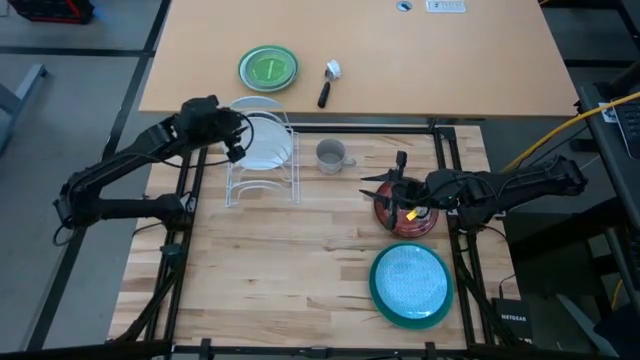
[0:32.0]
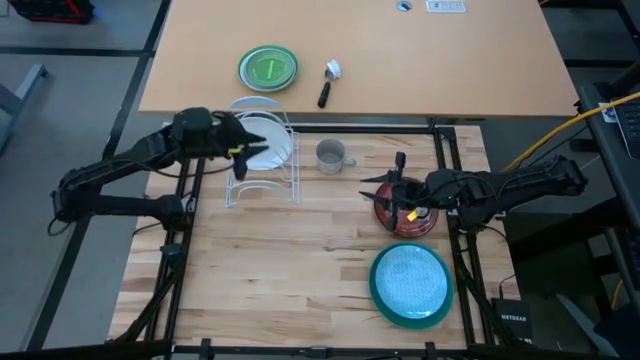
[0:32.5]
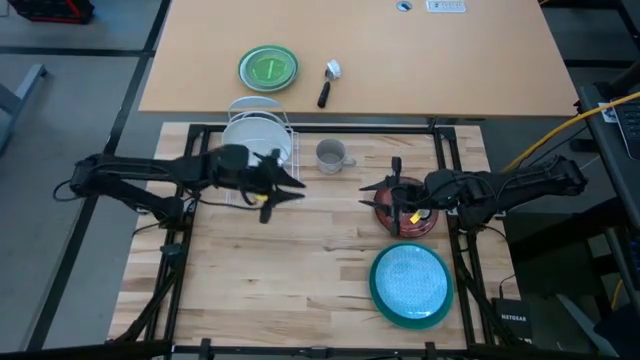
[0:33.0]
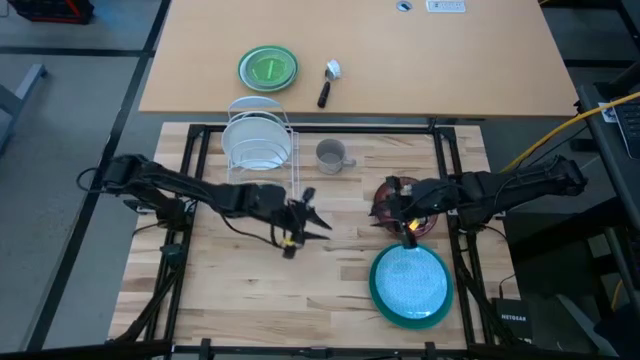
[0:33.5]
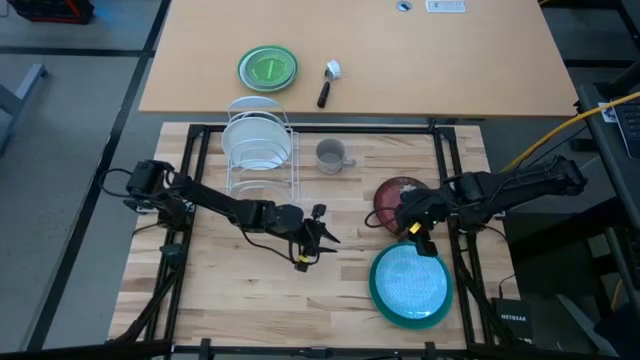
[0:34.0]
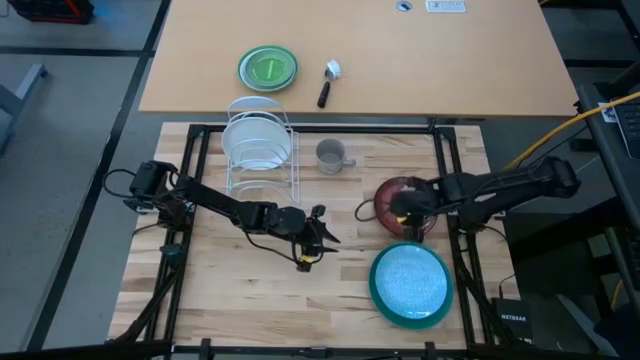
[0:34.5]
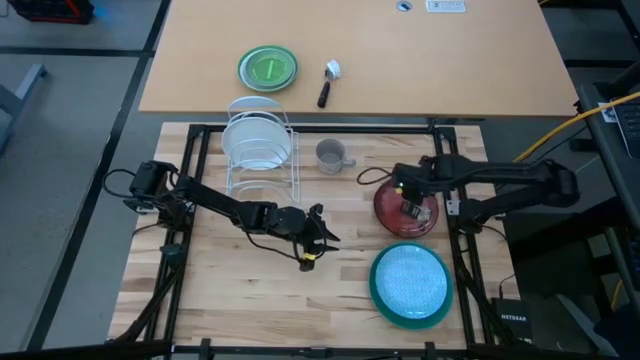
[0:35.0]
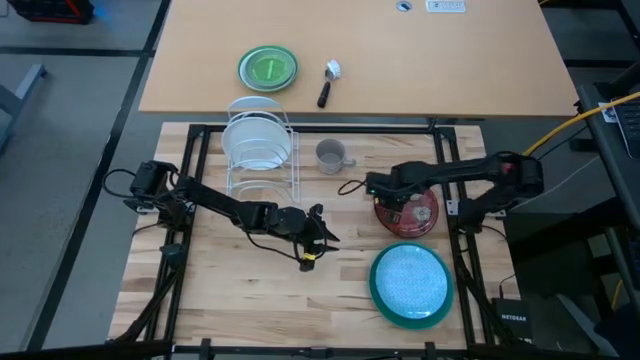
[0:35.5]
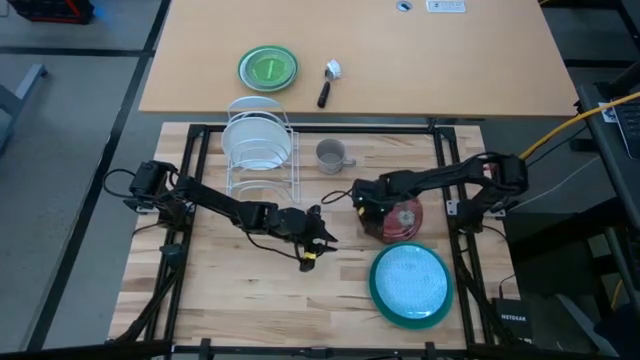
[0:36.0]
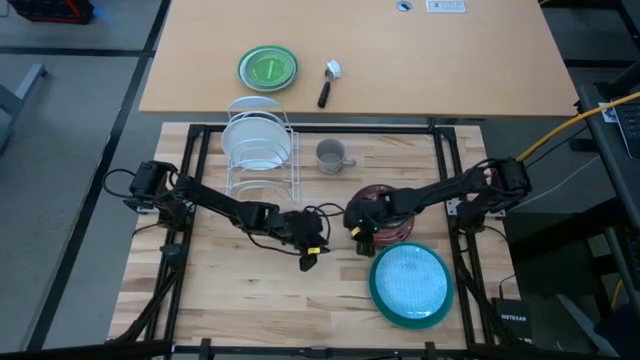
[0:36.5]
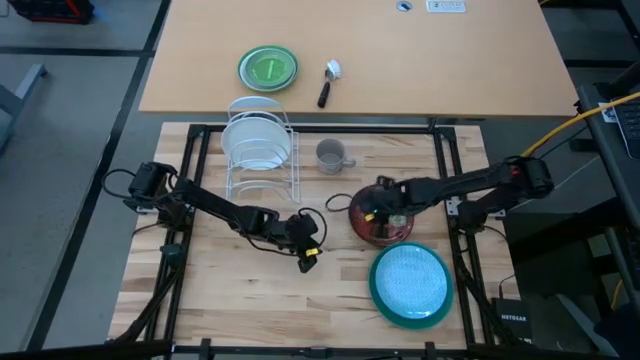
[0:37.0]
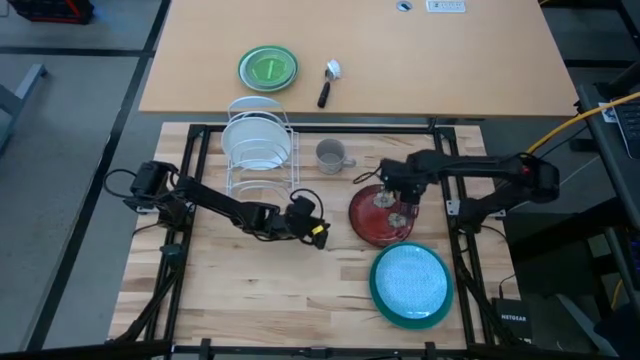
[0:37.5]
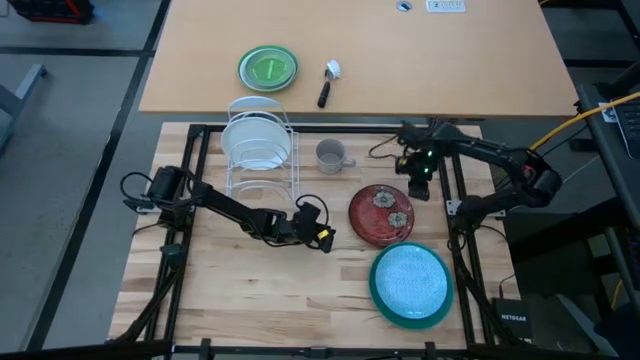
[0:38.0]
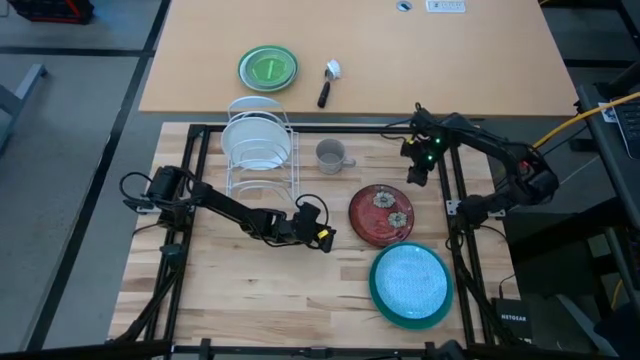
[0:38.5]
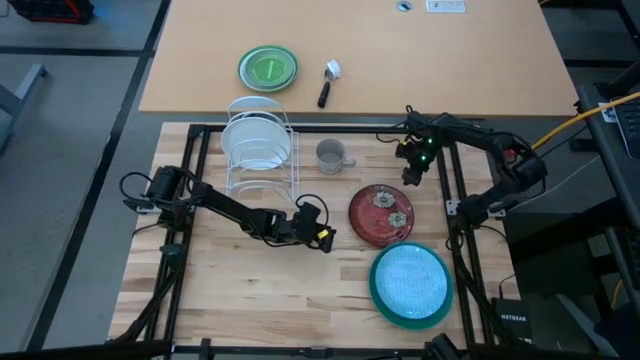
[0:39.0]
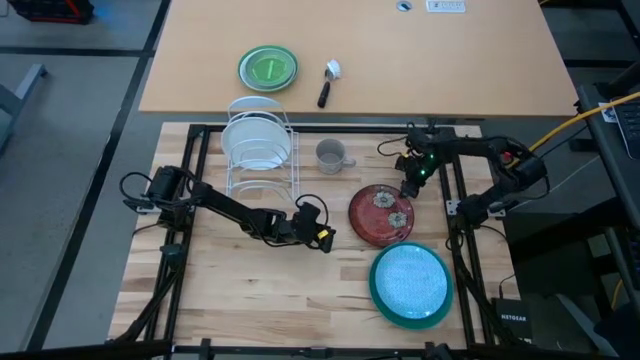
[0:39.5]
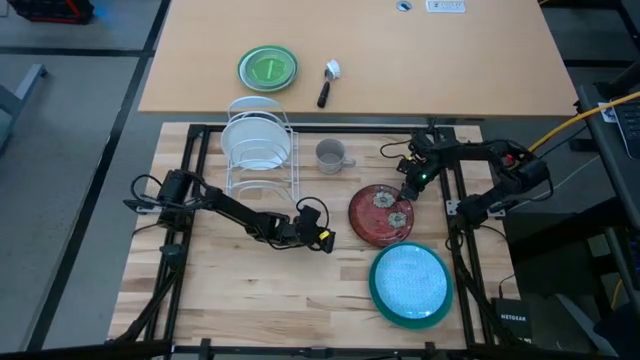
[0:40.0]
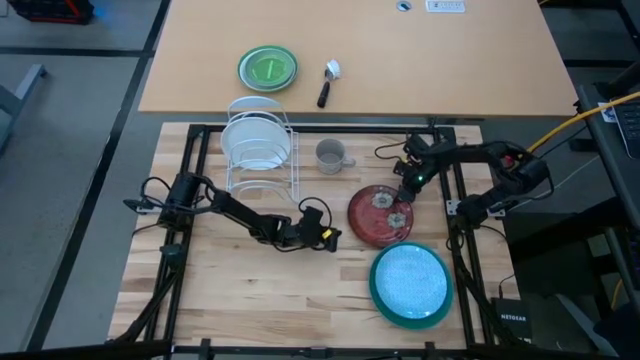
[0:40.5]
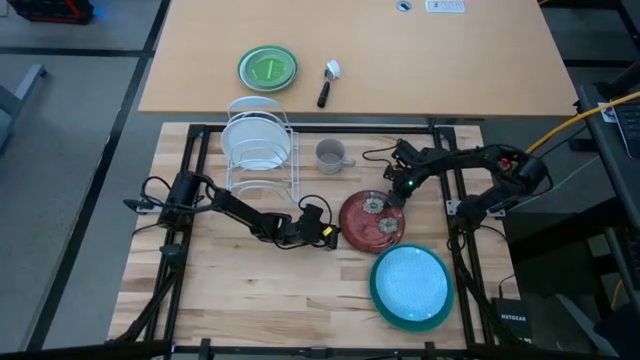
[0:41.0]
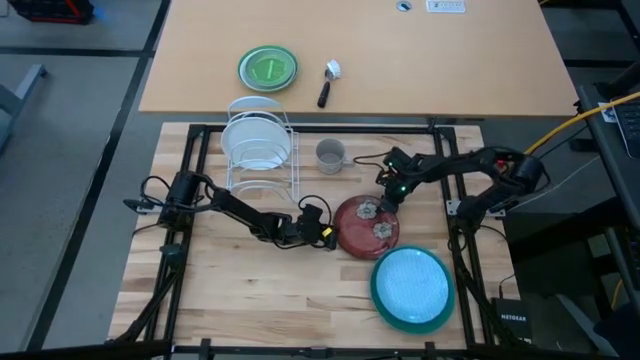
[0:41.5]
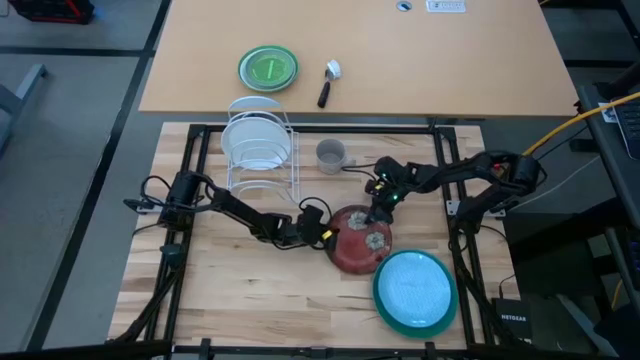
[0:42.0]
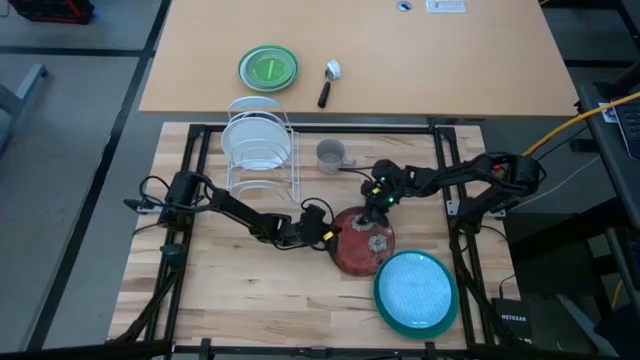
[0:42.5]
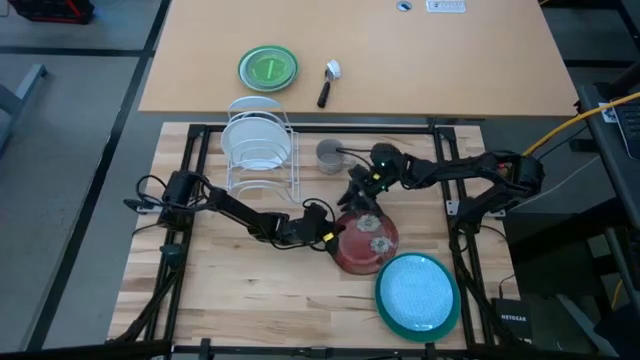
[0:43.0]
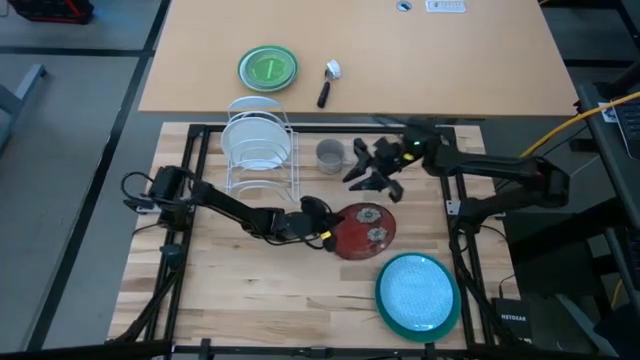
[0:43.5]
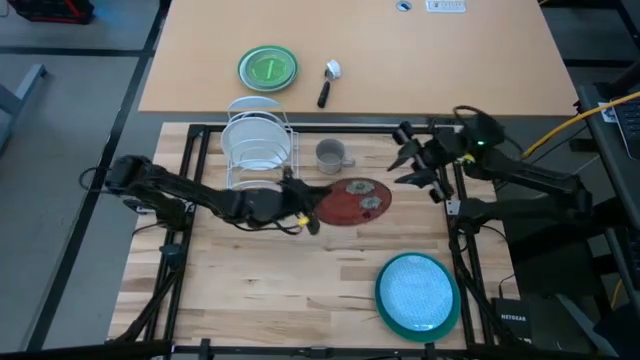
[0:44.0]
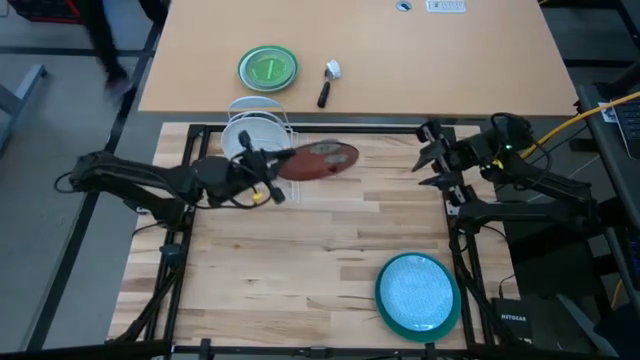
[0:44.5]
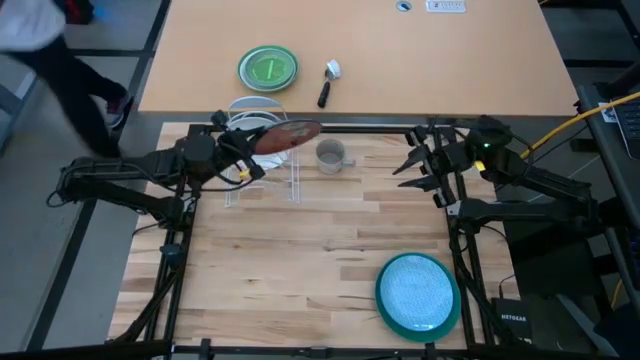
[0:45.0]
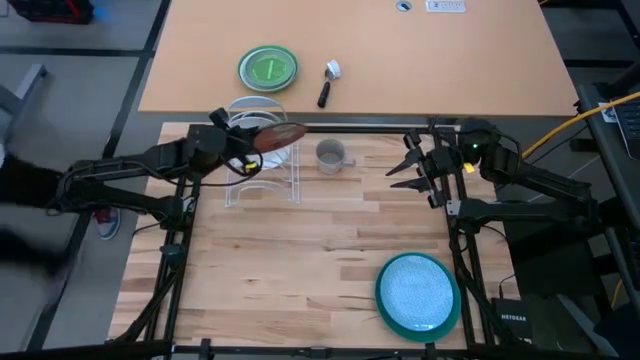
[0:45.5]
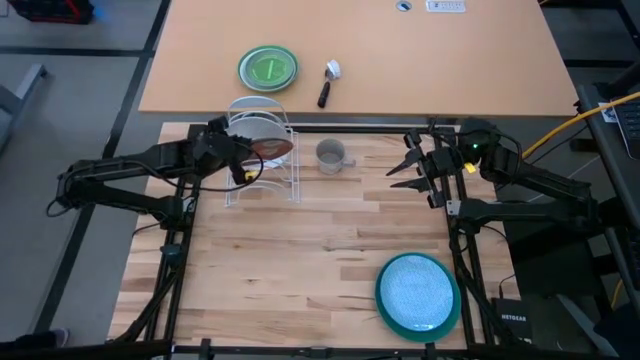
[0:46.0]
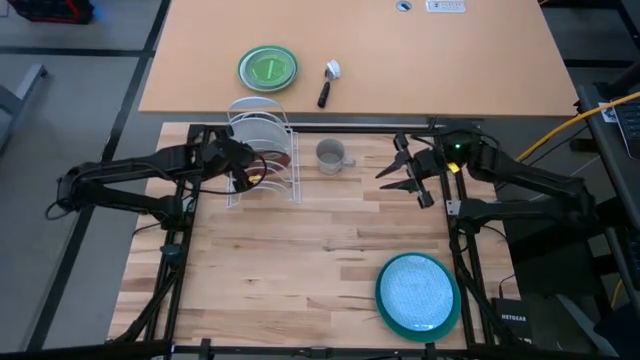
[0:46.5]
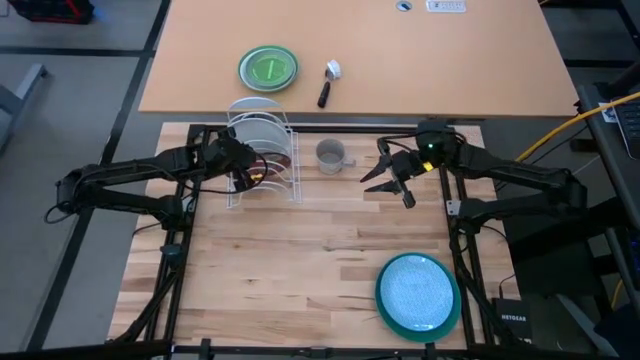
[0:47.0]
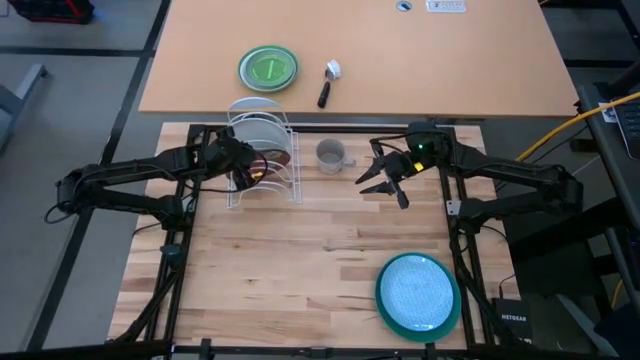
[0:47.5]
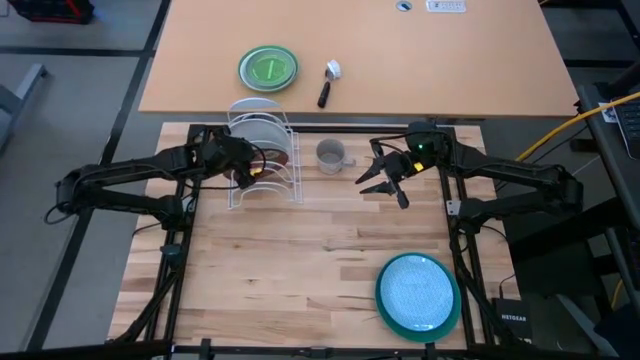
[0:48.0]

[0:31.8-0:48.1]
Task: Sort dishes
Put the red plate into the dish rack

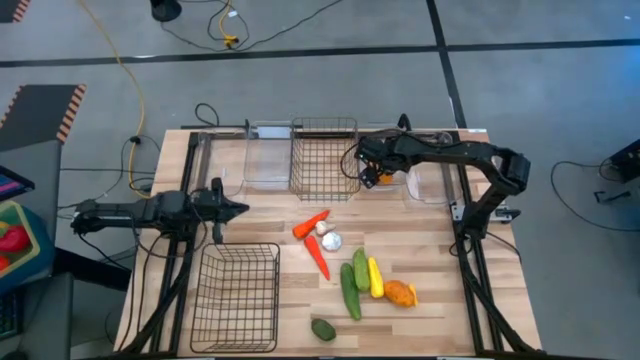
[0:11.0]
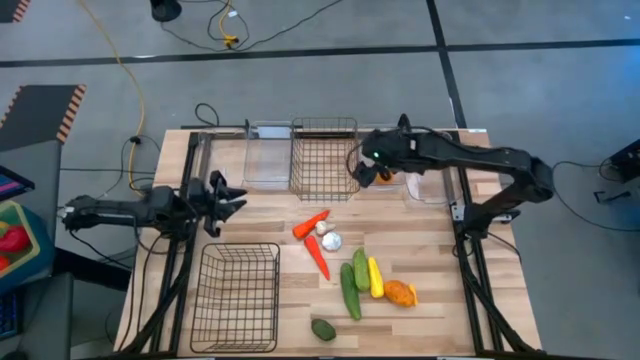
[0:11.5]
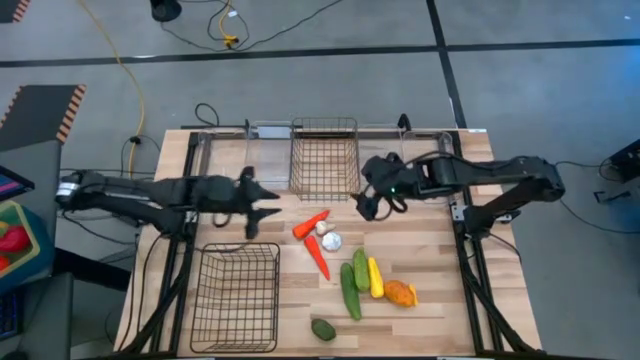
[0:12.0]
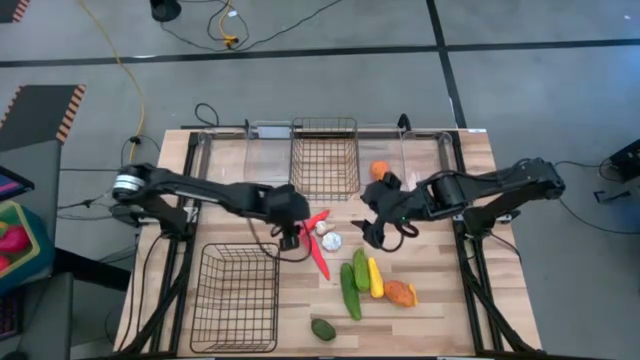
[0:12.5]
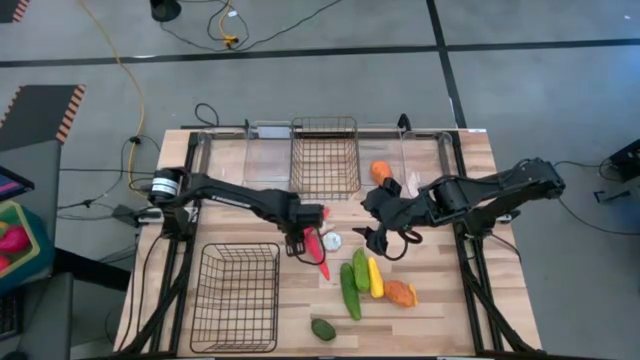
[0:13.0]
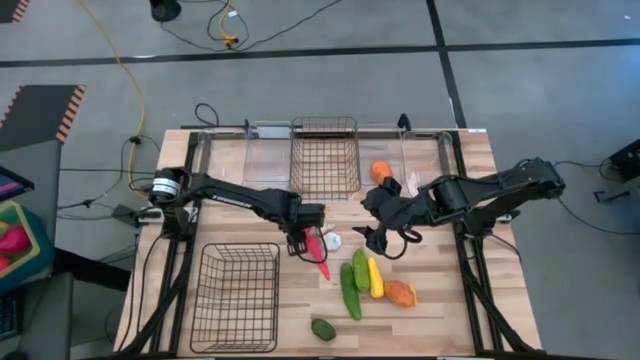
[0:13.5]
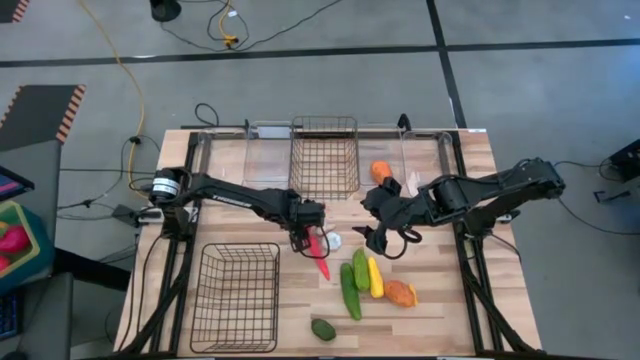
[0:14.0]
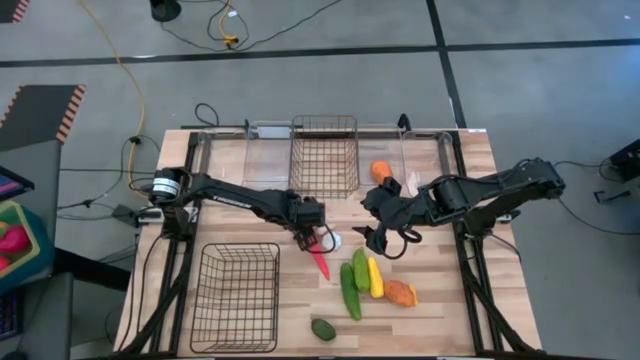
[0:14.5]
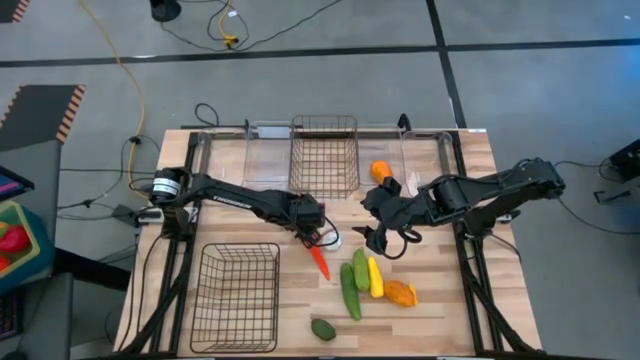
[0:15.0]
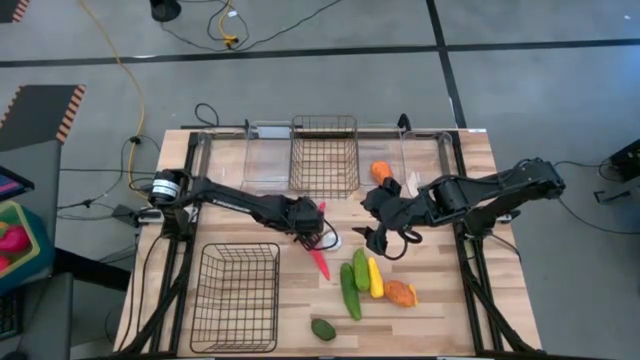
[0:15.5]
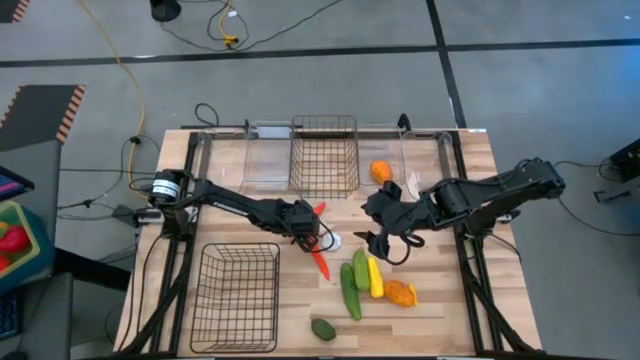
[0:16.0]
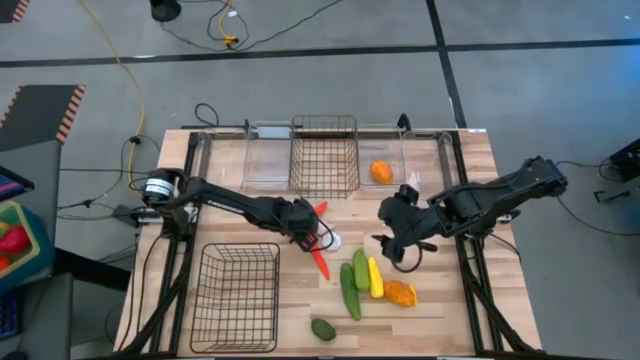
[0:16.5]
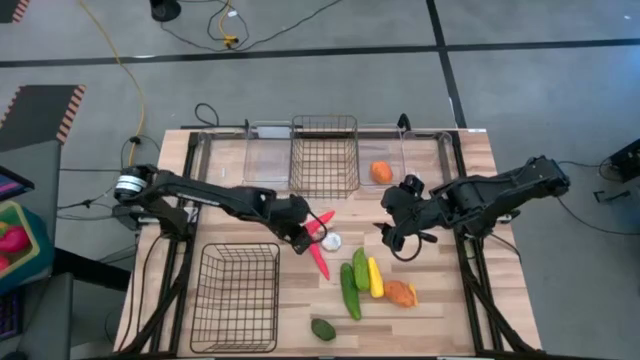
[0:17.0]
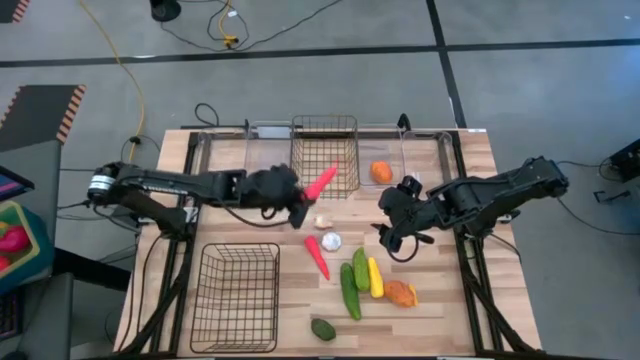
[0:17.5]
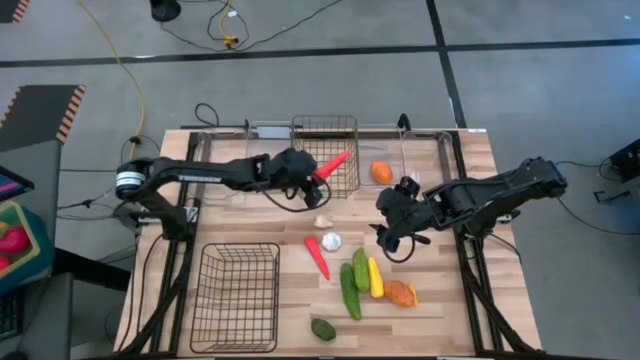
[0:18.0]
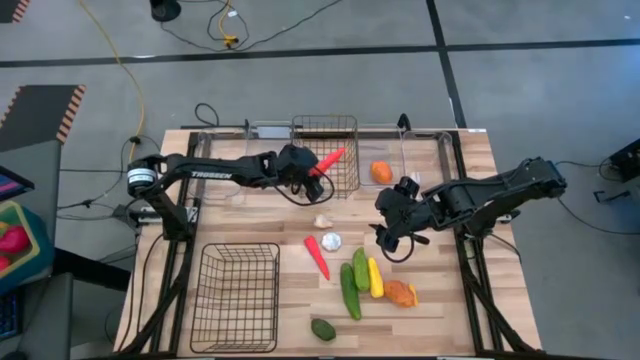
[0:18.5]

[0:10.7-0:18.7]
Task: Sort produce into baskets
Put the top orange carrot into the top wire basket
